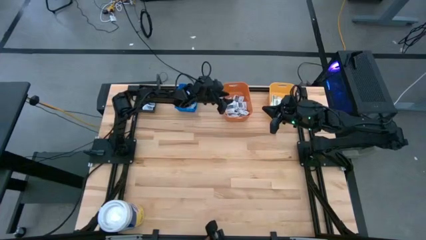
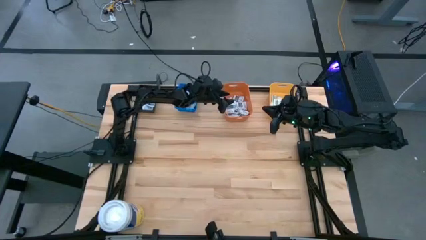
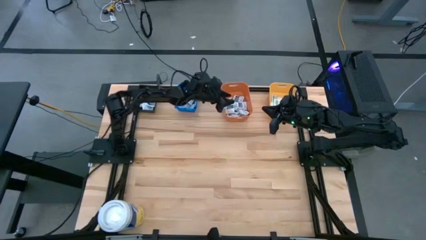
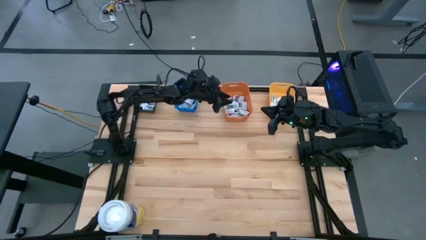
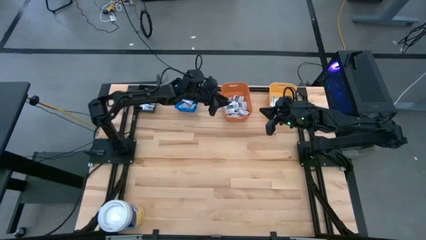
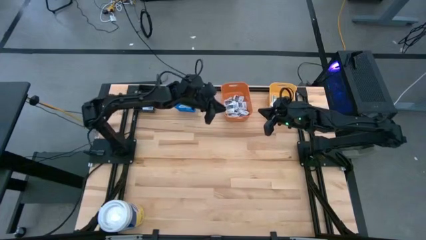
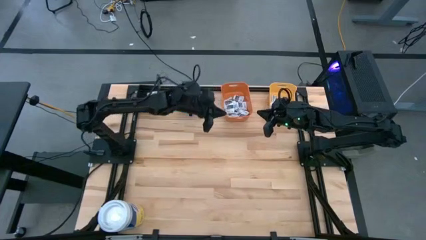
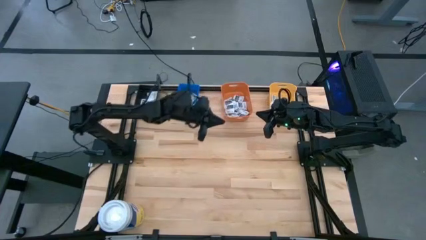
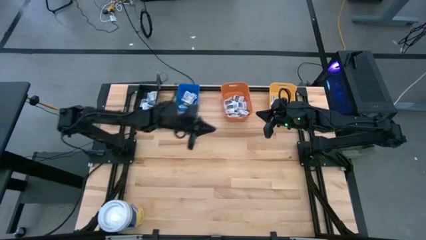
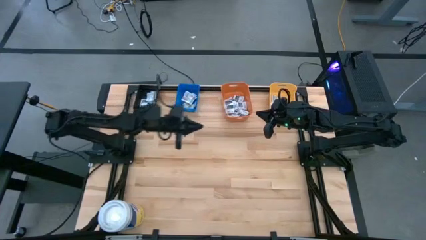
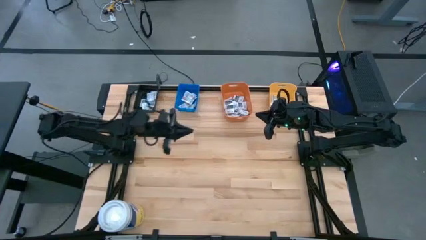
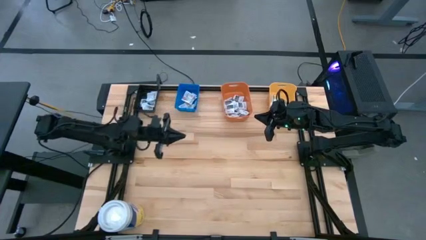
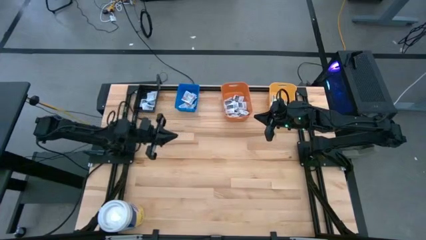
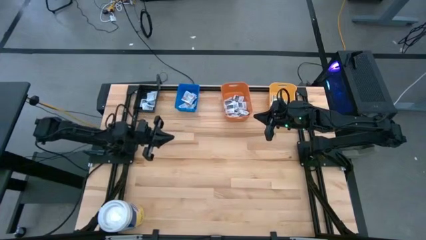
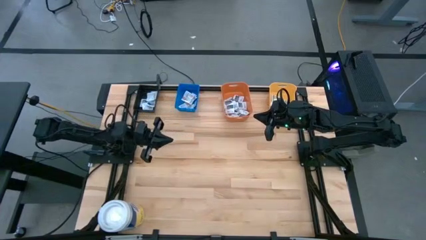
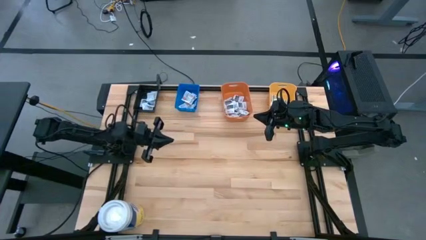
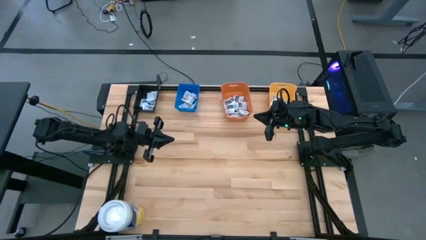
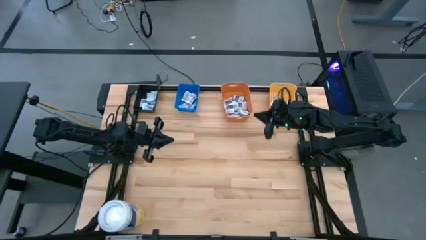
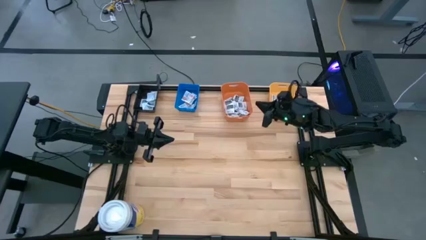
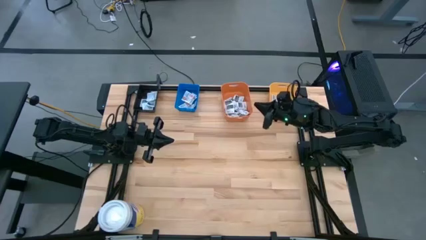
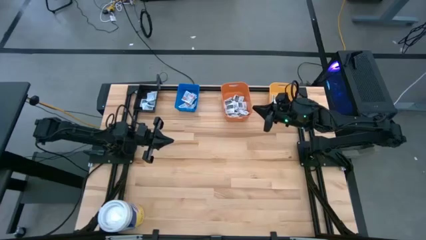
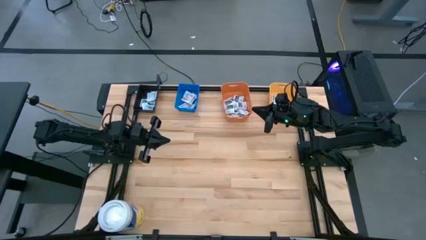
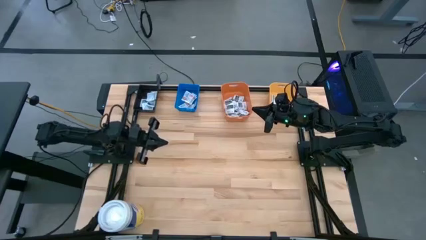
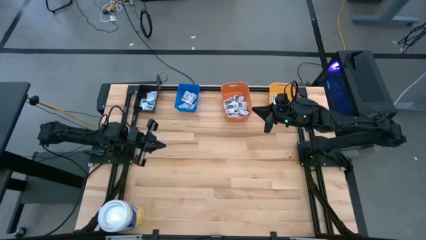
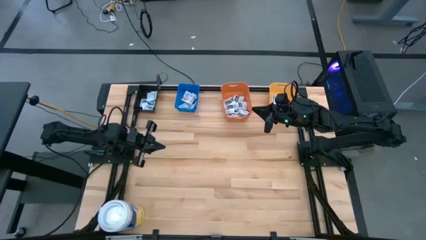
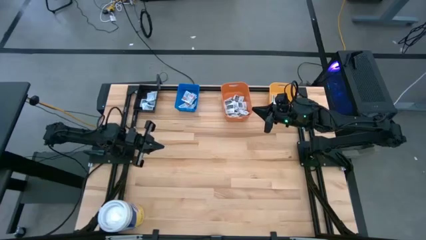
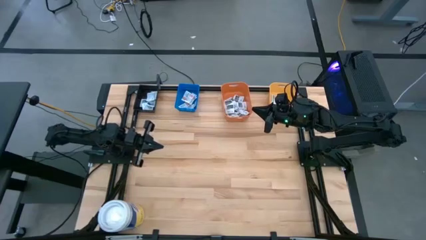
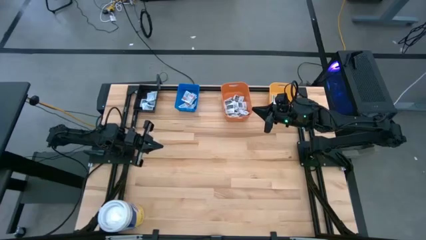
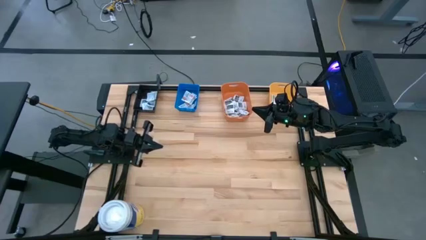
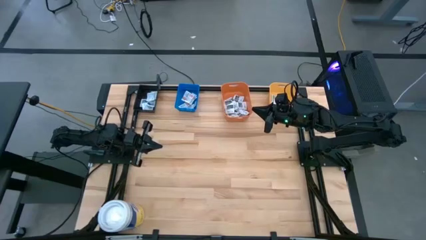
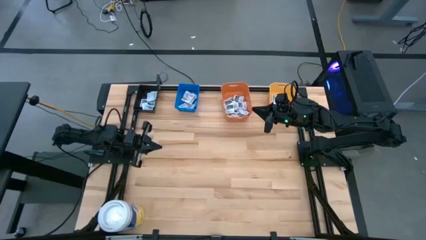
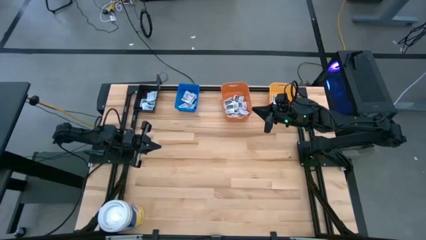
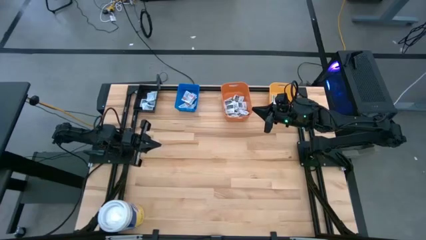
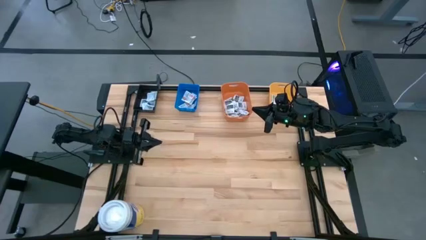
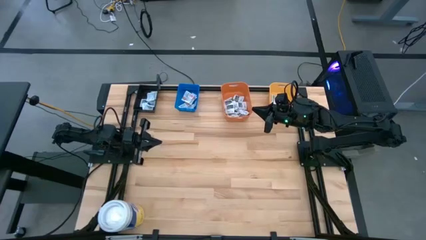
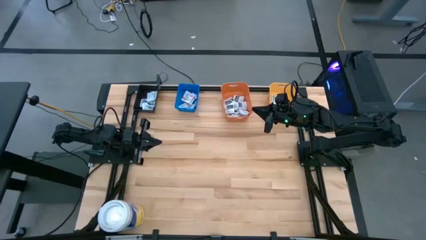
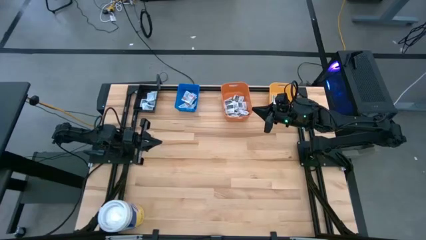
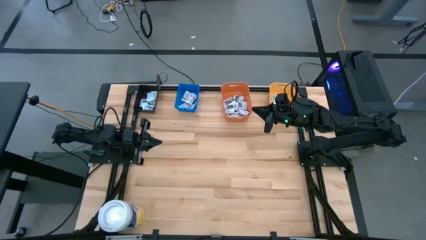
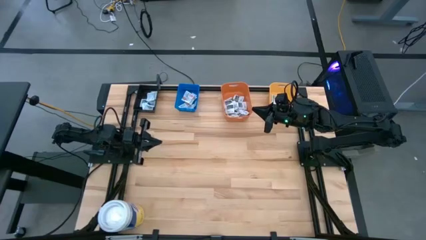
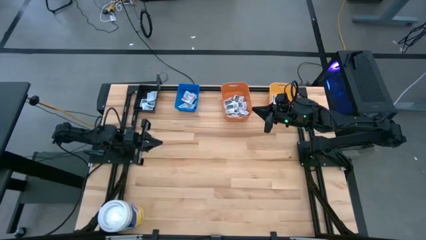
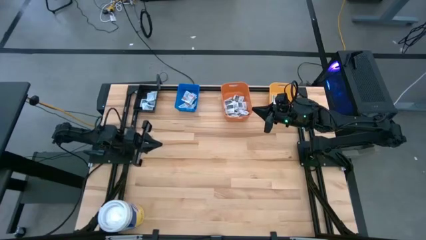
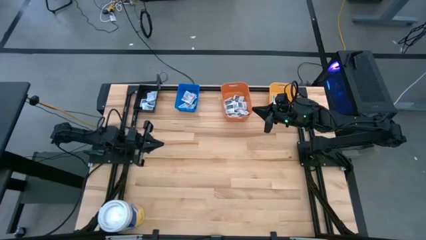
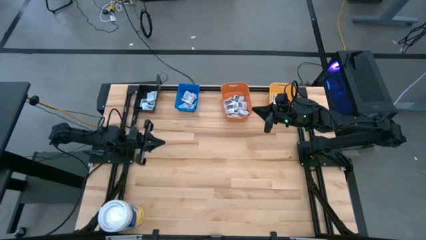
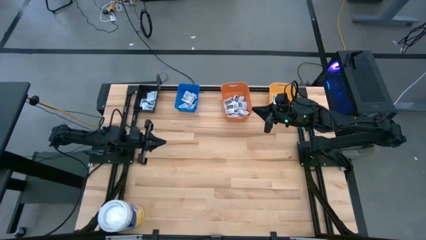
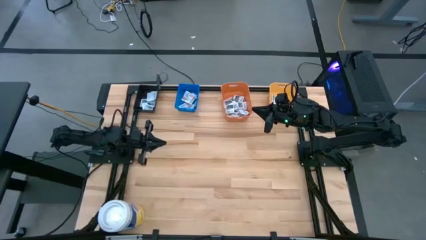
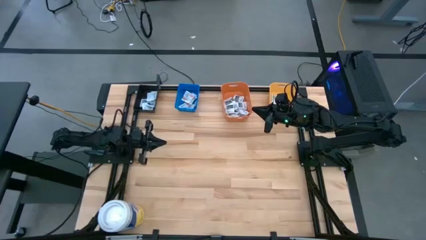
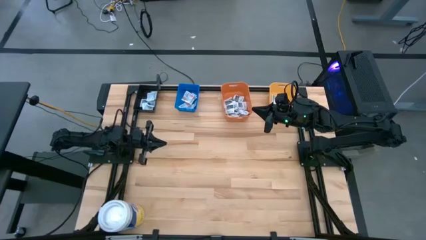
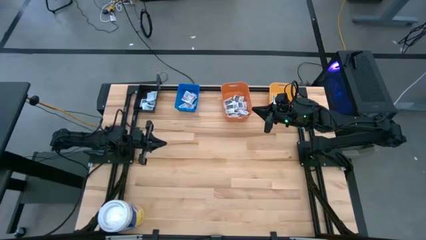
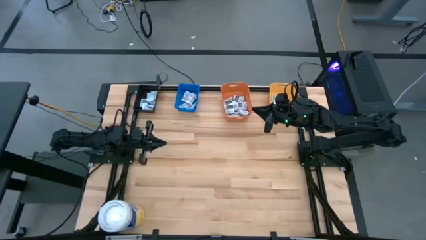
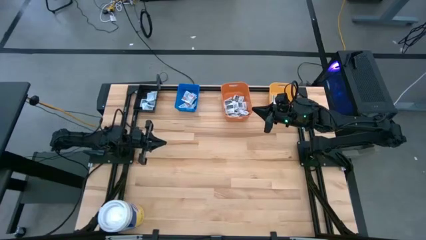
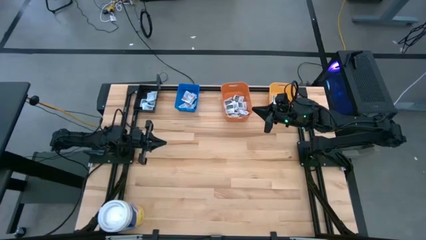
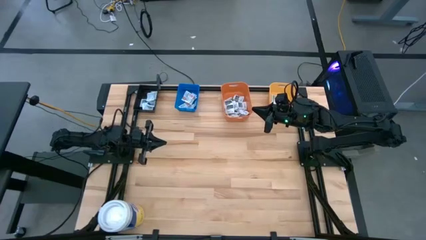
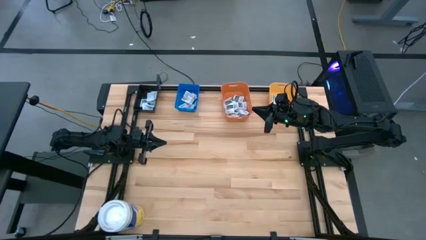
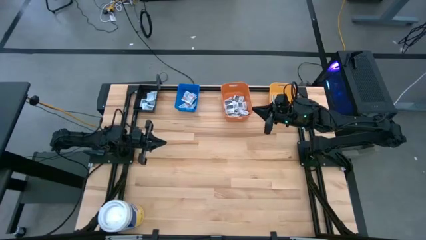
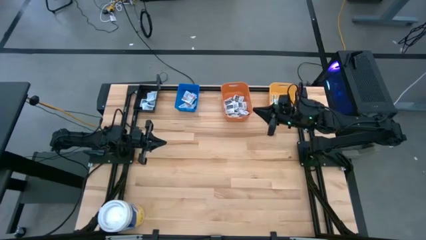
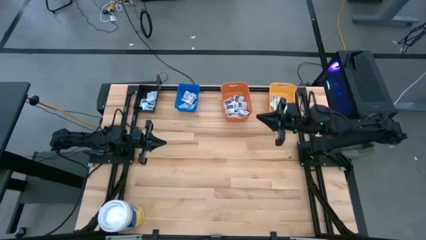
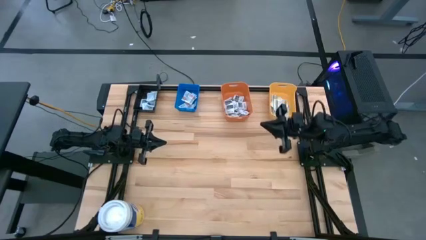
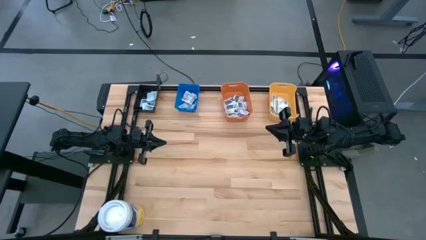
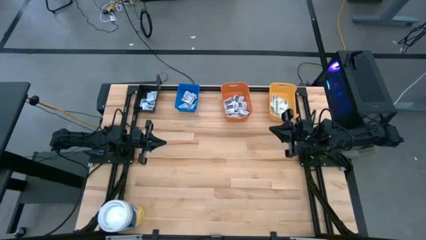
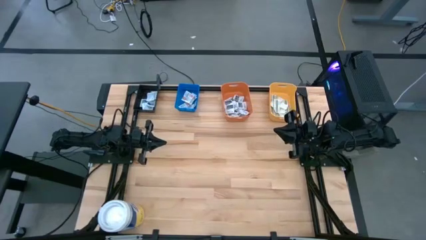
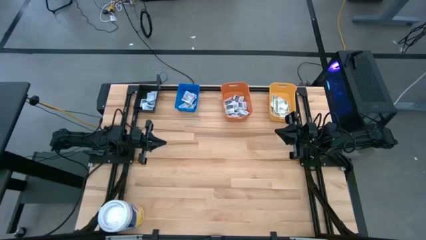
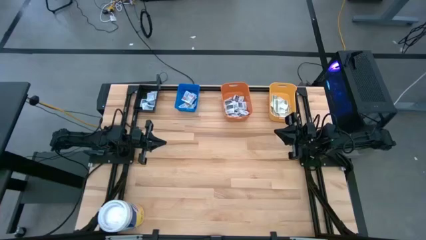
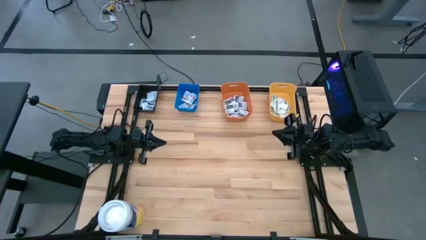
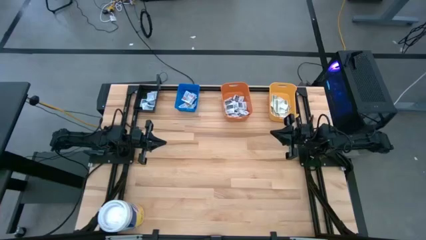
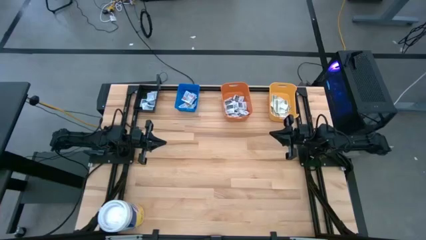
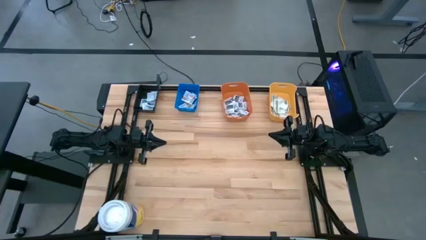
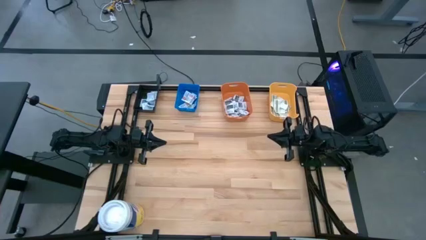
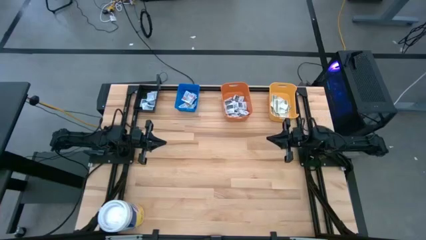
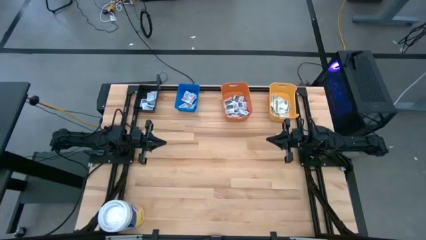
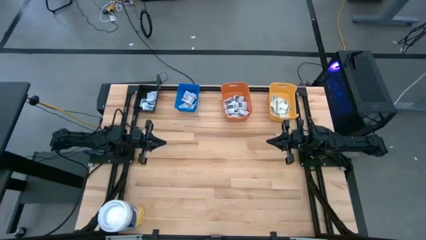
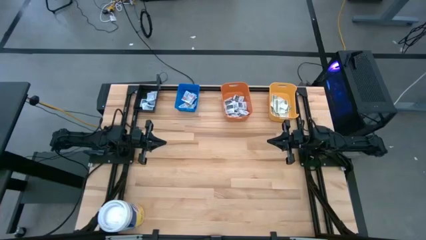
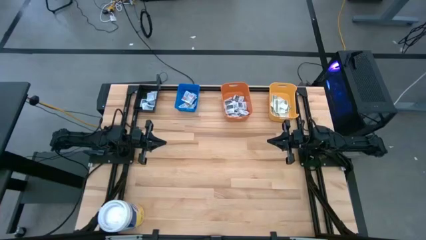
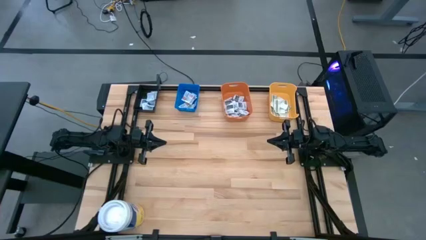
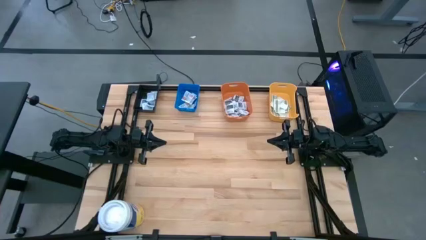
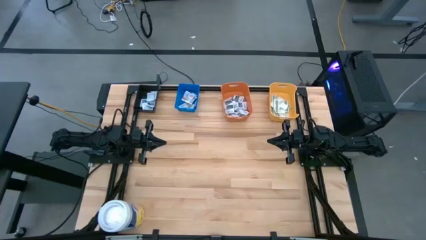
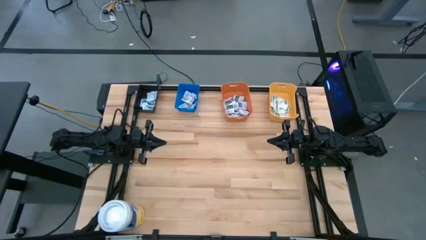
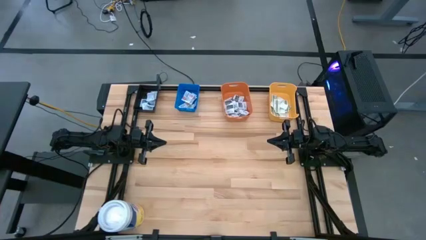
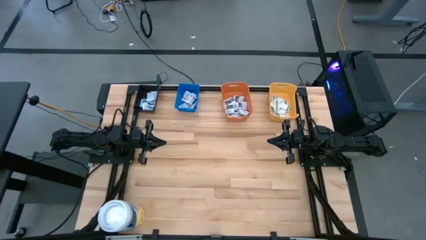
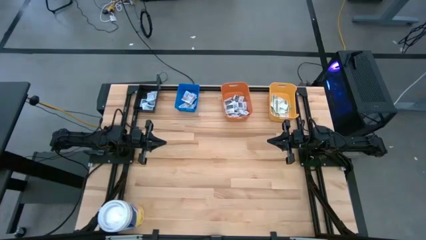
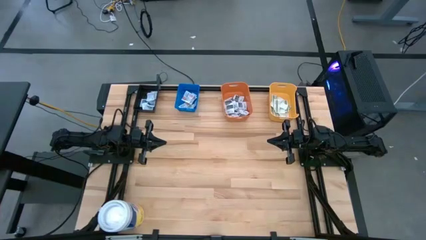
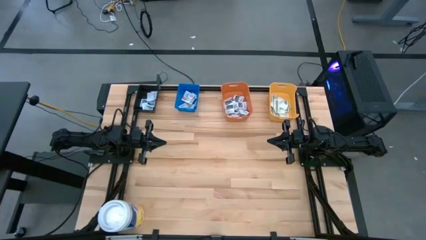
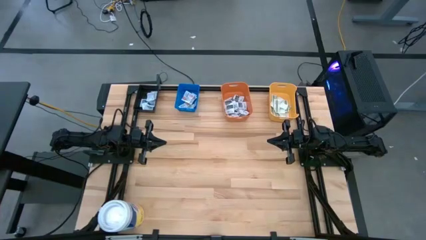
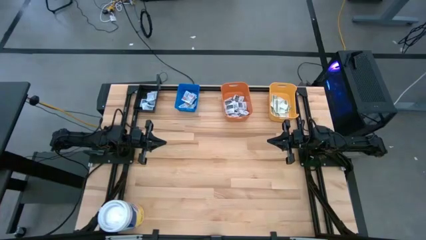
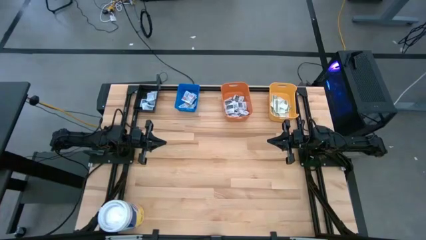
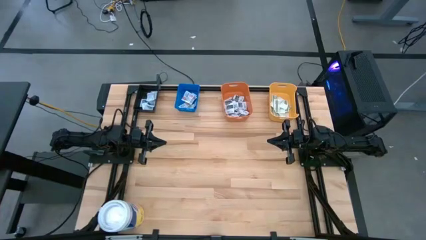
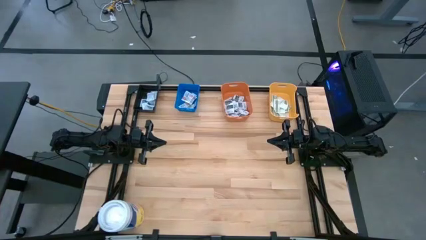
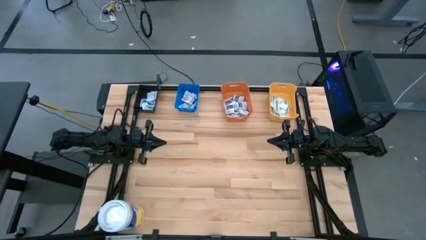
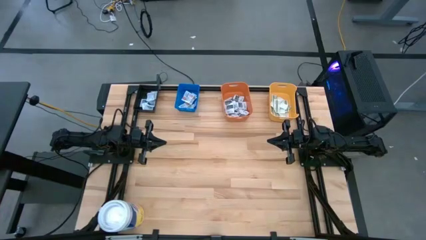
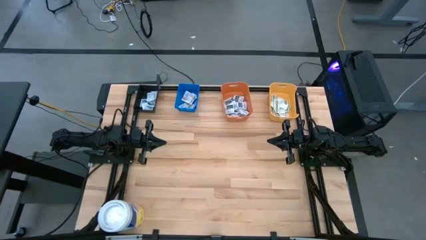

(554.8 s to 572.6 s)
Task: Pick & Place First Aid Supplies
Return to home position
